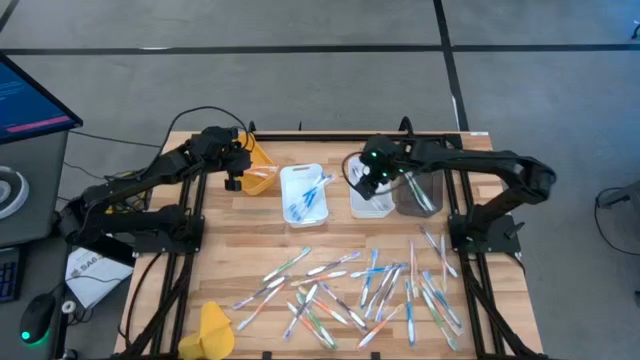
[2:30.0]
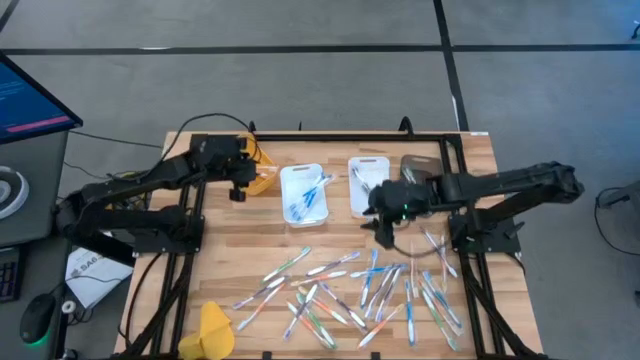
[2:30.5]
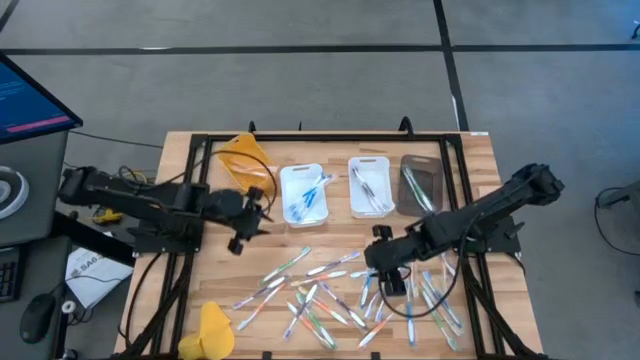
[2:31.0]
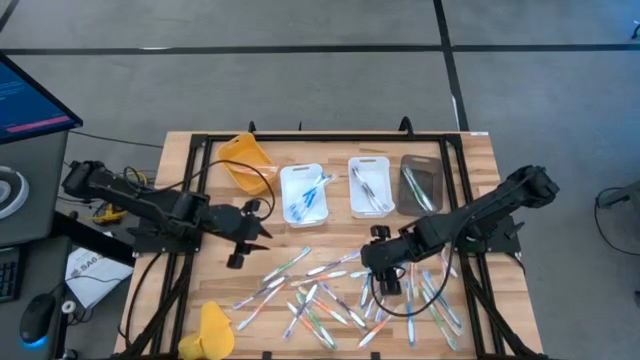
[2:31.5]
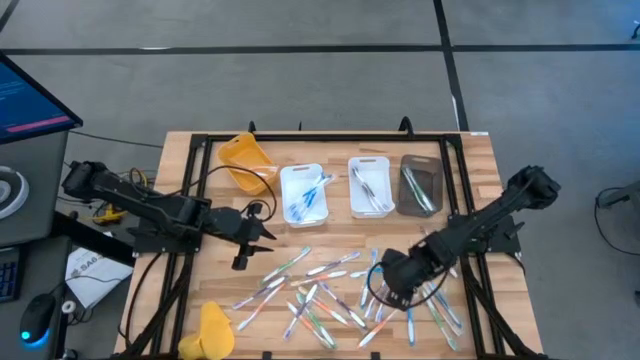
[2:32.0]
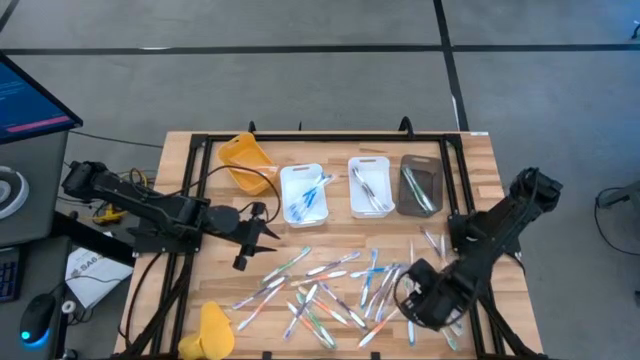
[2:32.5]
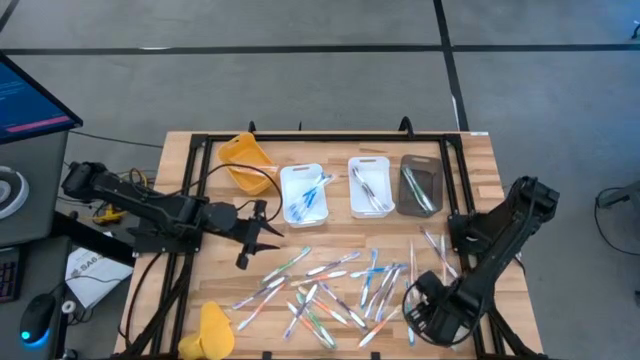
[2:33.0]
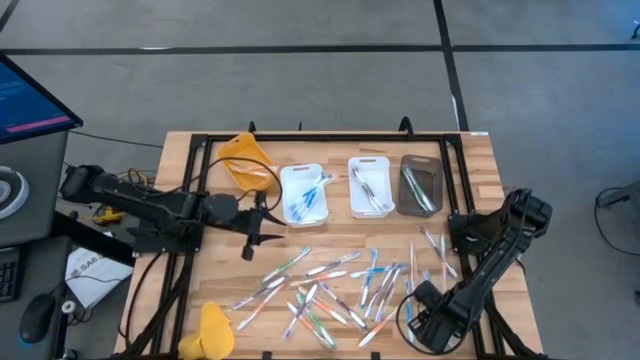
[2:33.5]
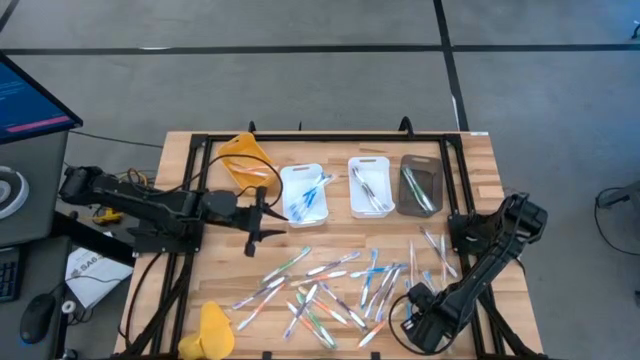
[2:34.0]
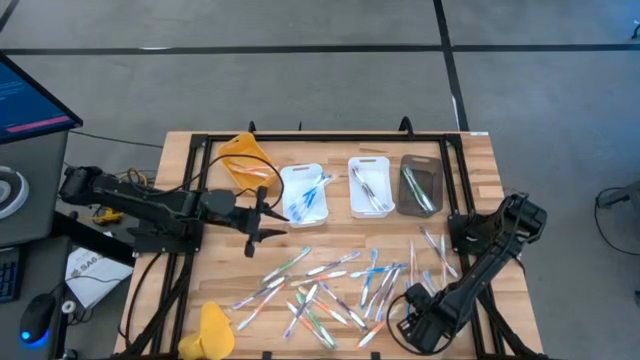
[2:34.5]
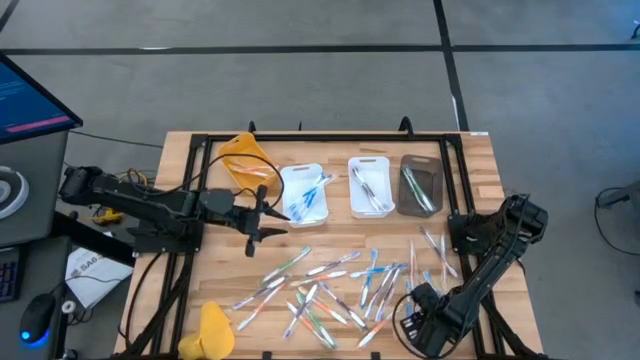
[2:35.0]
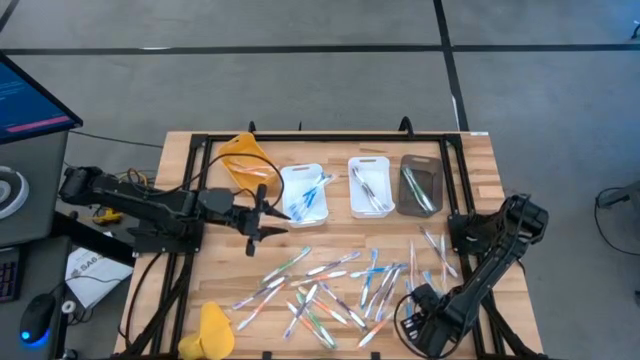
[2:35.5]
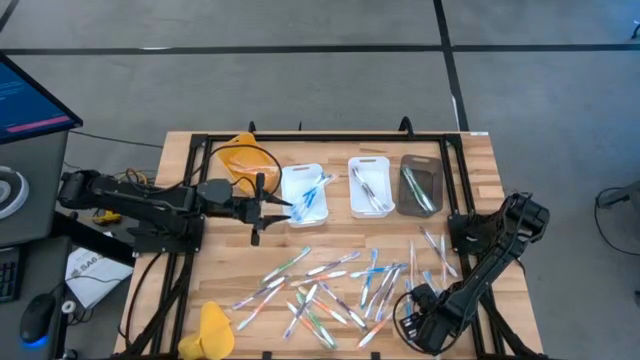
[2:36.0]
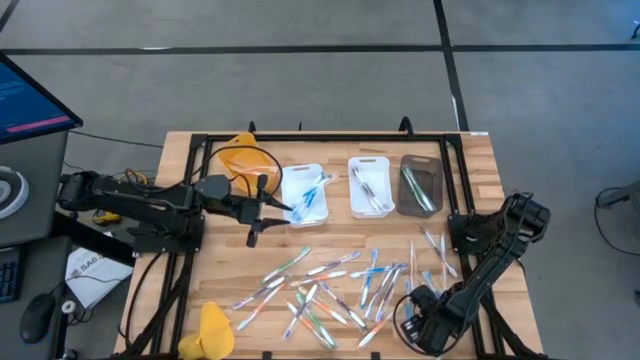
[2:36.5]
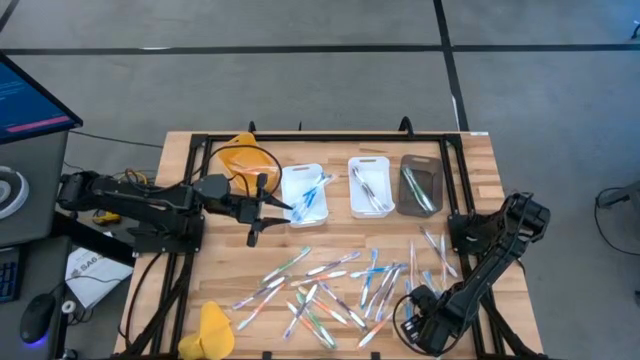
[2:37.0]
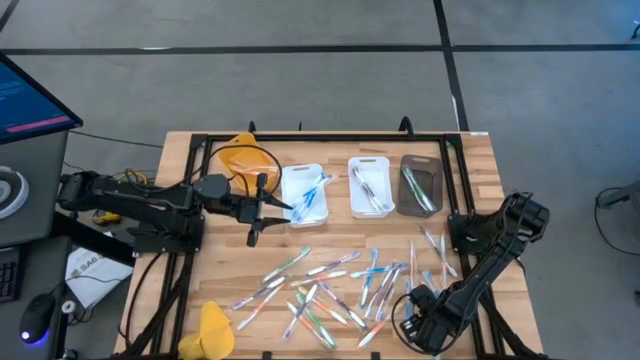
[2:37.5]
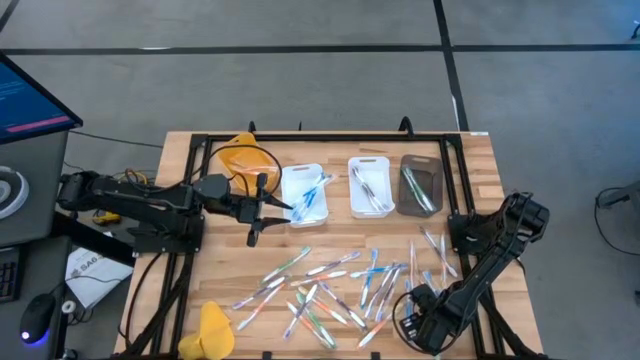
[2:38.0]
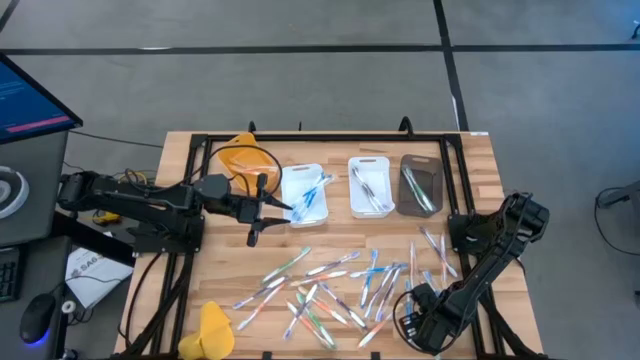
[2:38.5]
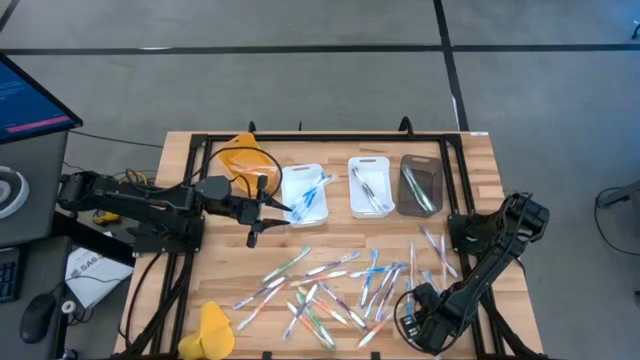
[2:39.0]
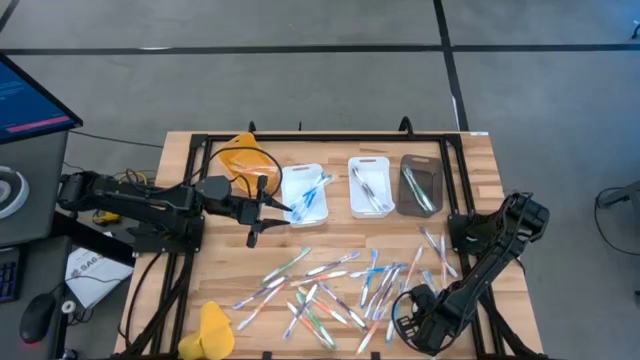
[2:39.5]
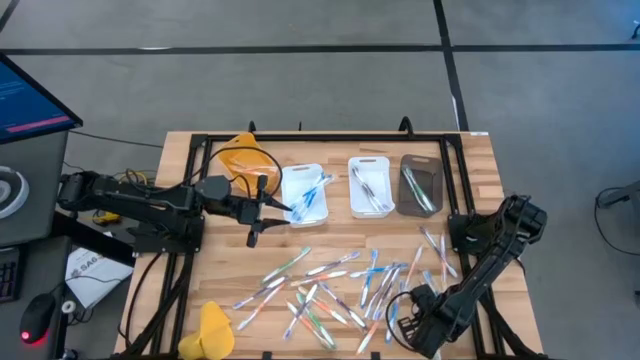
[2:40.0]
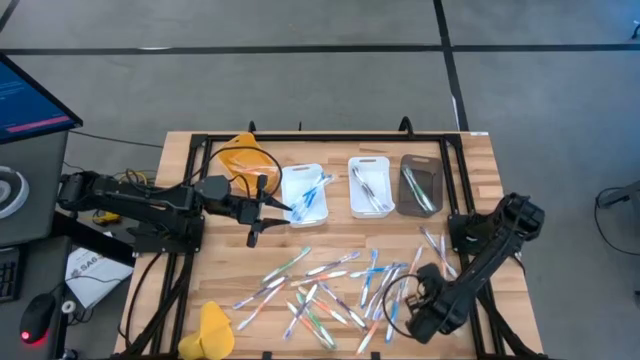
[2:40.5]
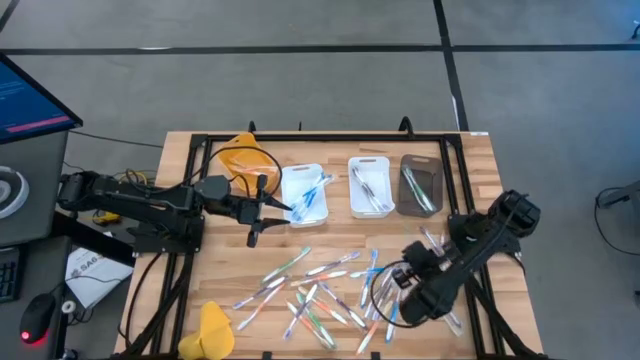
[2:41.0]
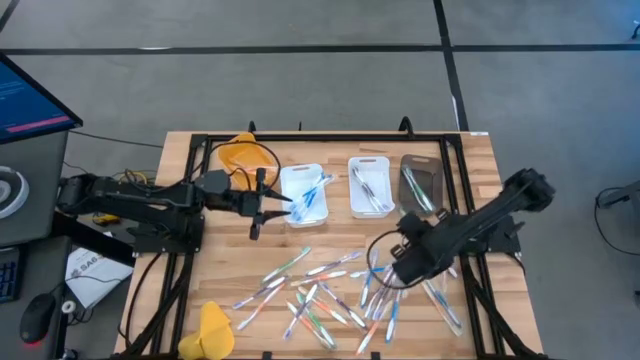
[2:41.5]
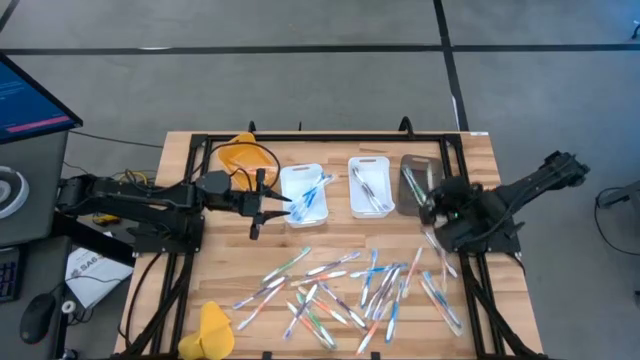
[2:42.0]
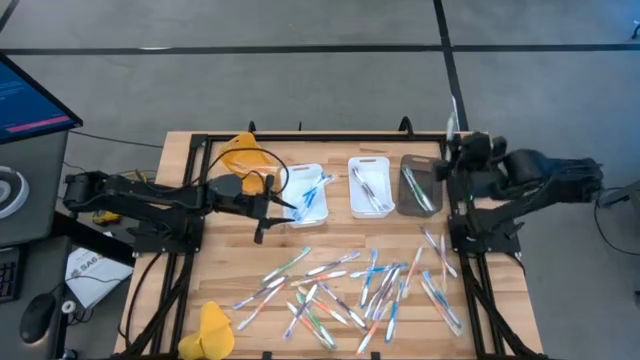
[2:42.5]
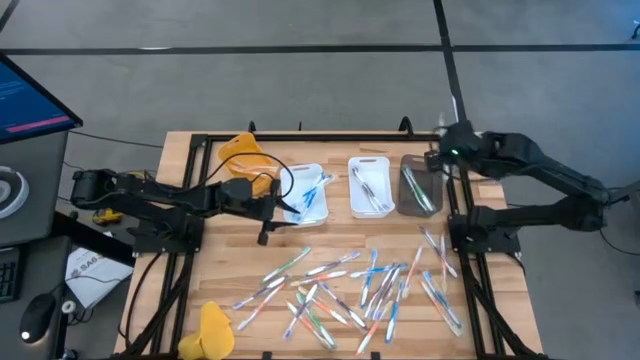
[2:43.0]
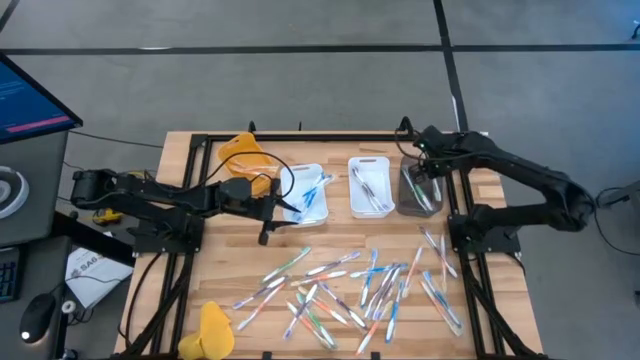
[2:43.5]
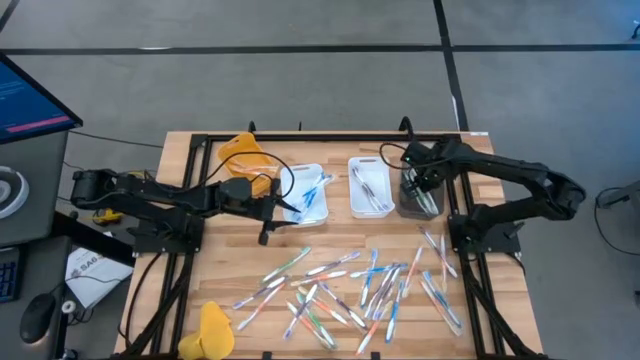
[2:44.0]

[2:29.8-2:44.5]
Task: Pick & Place Toothbrushes
Put the bottom right green toothbrush into the black bin

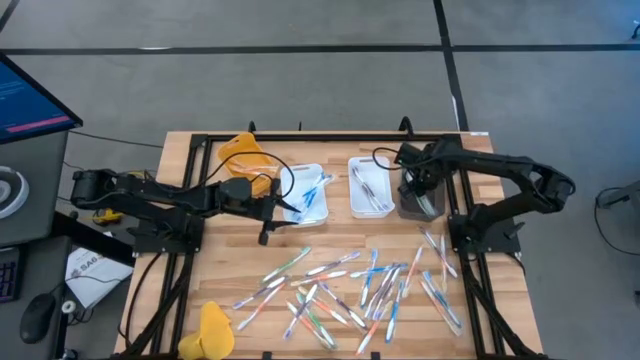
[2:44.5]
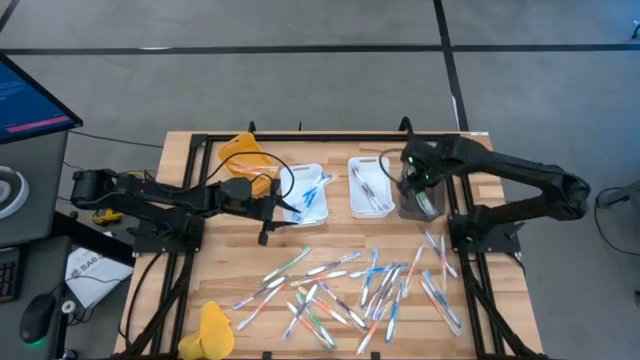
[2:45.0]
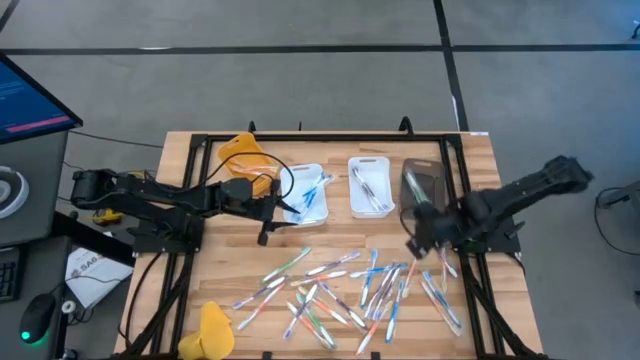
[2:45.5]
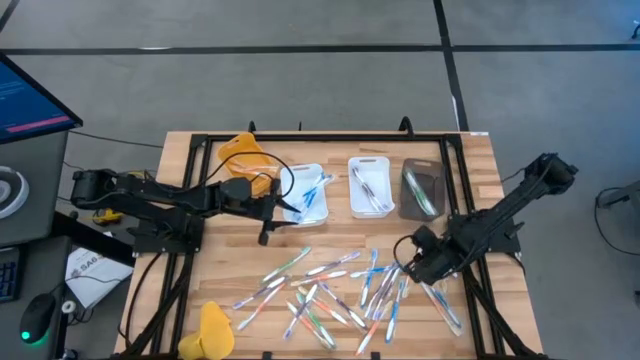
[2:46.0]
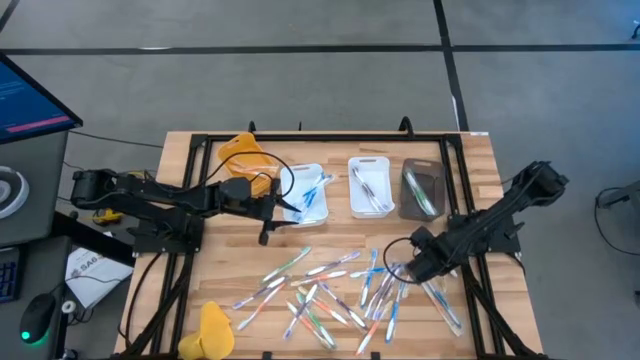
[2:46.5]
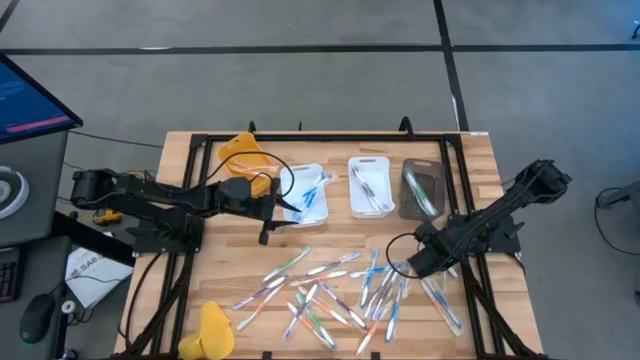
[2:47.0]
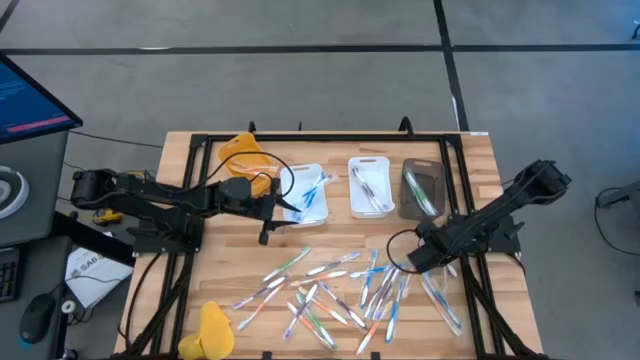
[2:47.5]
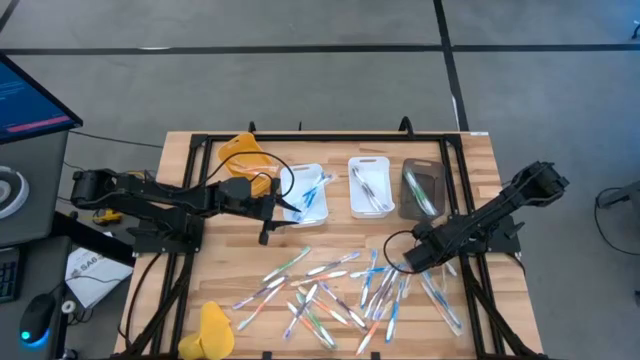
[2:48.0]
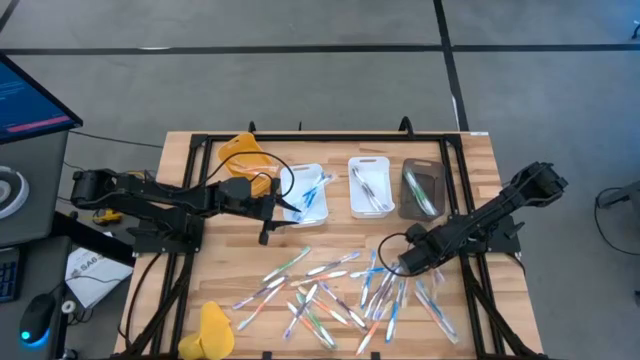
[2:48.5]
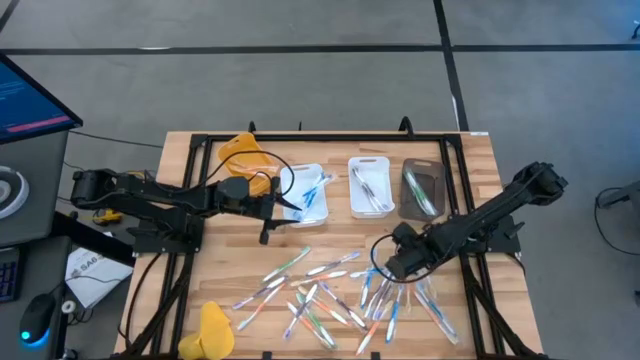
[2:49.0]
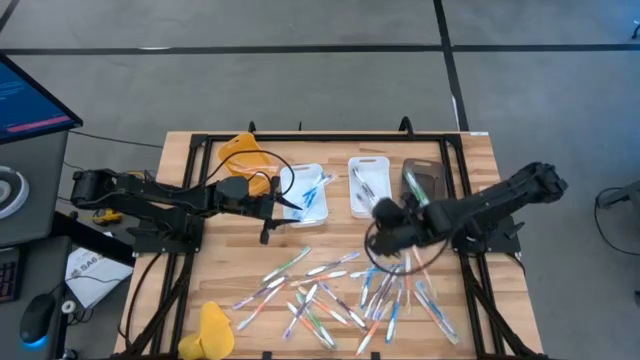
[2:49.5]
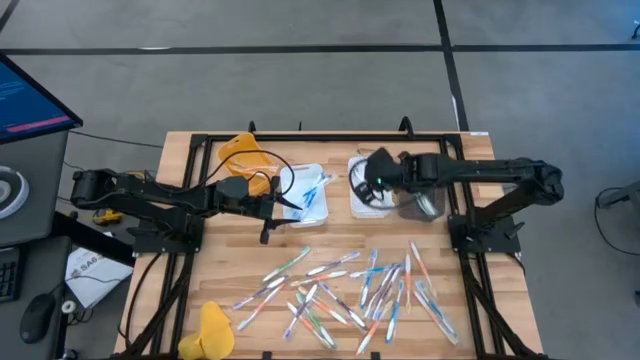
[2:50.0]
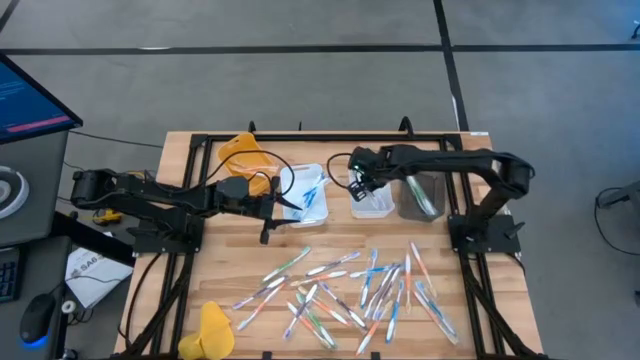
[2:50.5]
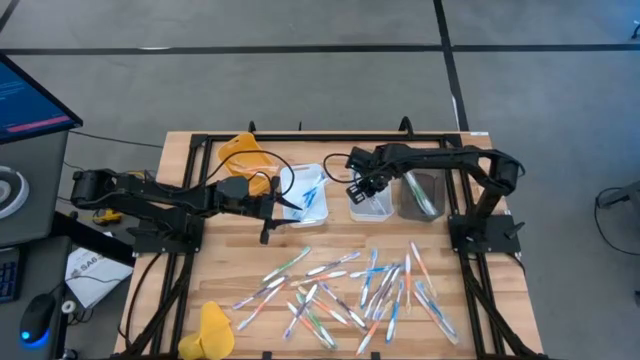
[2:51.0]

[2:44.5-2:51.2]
Put the purple toothbrush into the right white bin

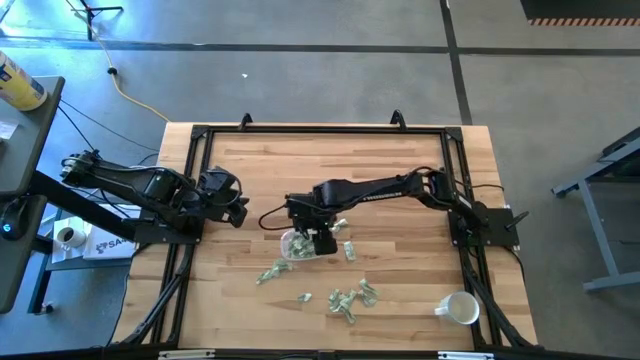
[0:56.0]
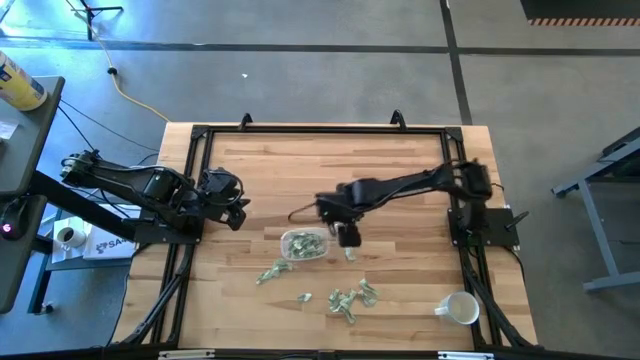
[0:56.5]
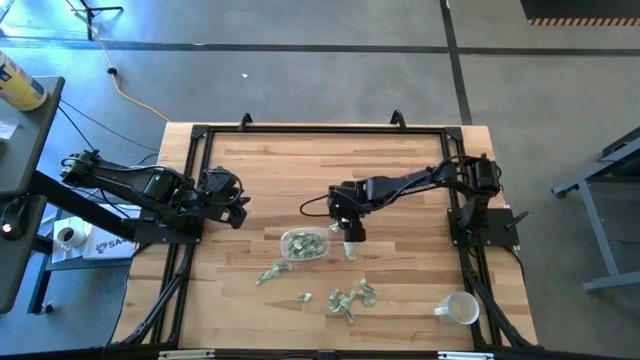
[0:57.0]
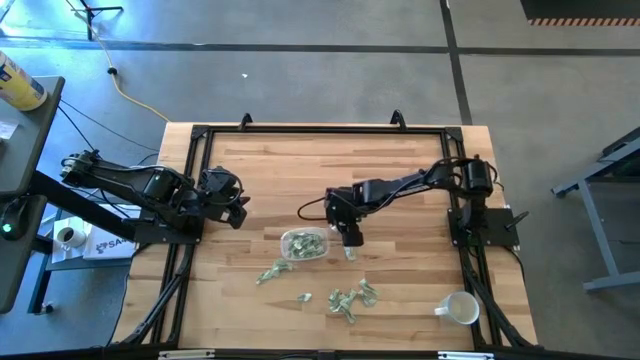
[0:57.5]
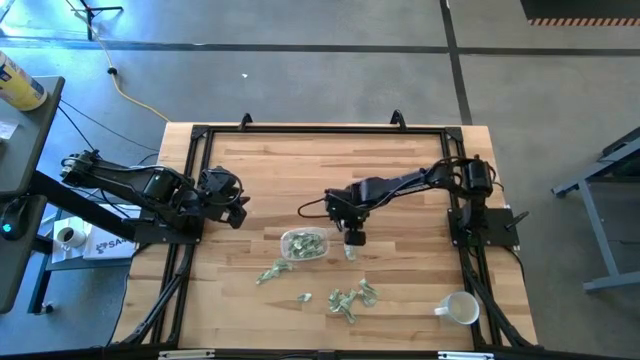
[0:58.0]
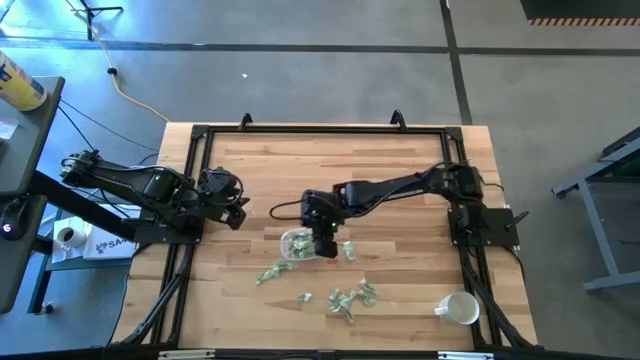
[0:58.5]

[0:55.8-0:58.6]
Task: Pick and place Stevia / Truvia into bins
Put the green stevia packet into the transparent bin
